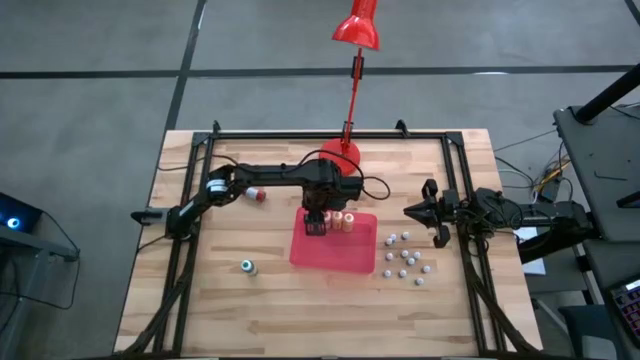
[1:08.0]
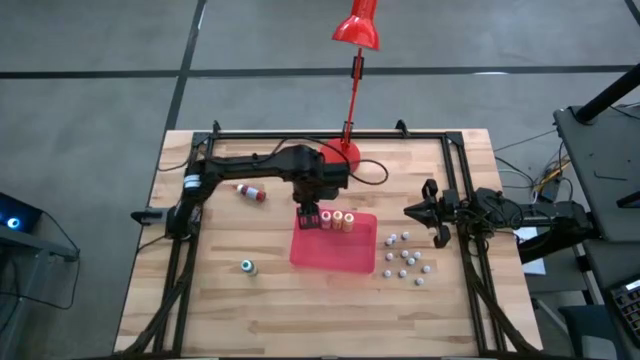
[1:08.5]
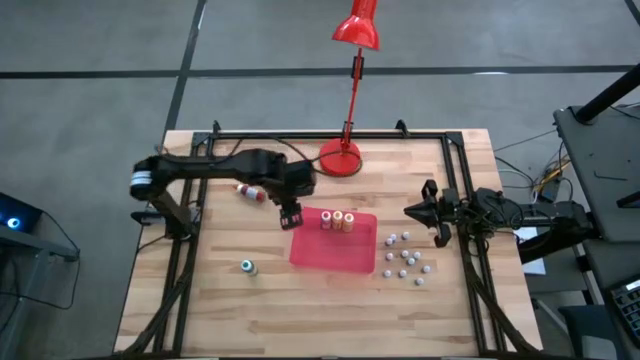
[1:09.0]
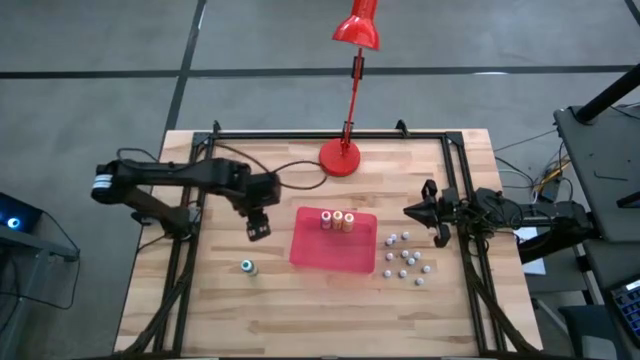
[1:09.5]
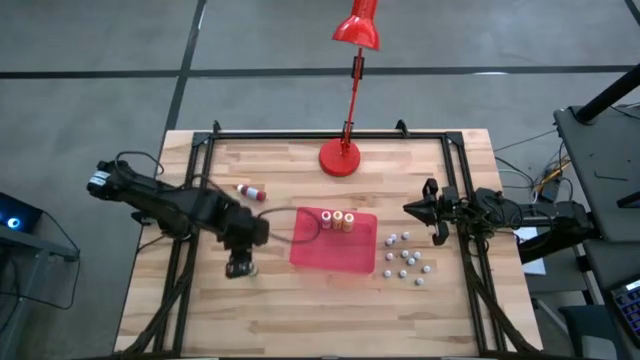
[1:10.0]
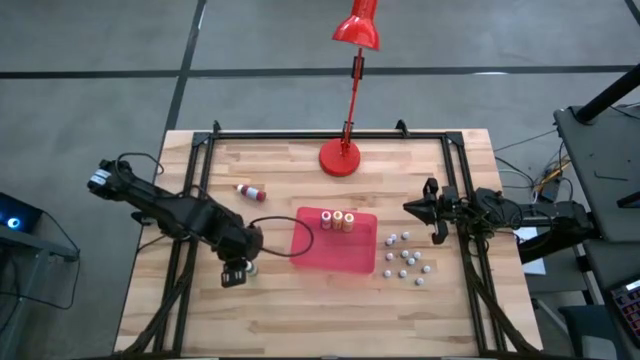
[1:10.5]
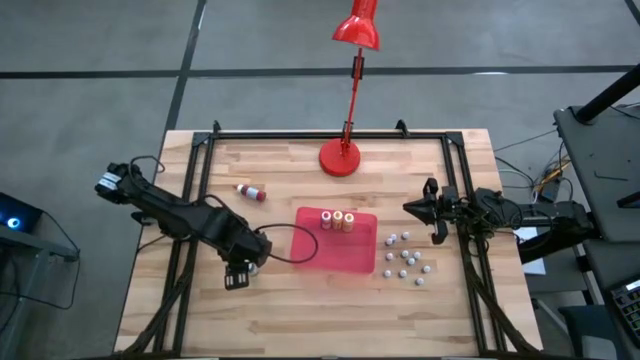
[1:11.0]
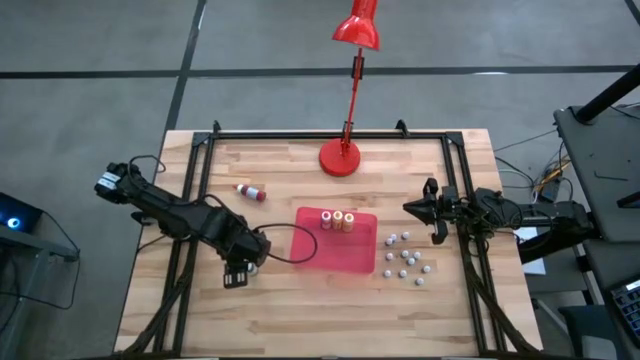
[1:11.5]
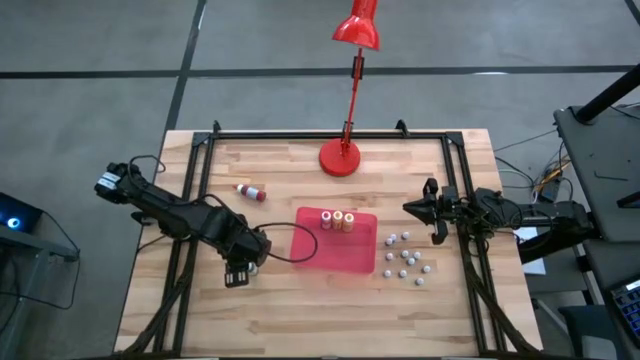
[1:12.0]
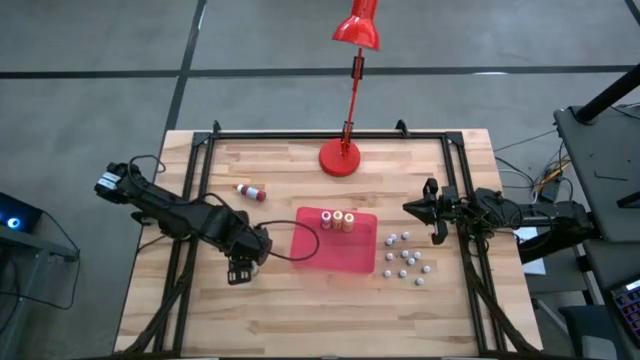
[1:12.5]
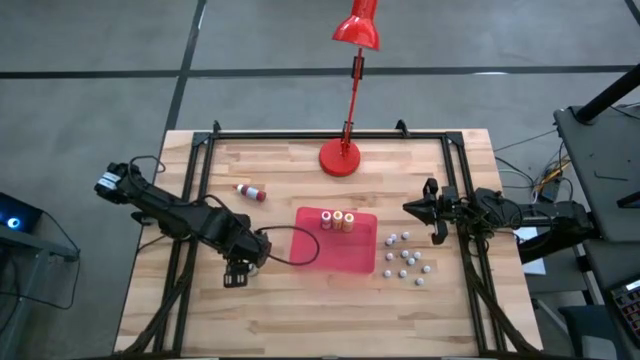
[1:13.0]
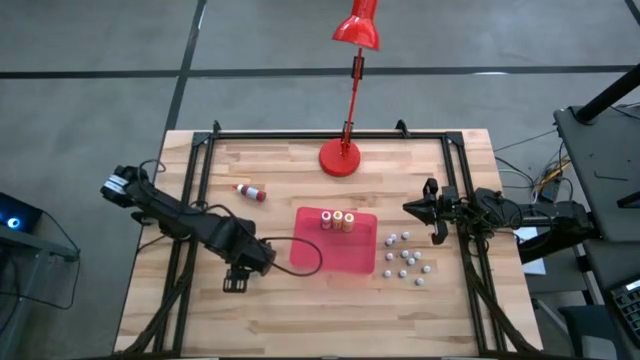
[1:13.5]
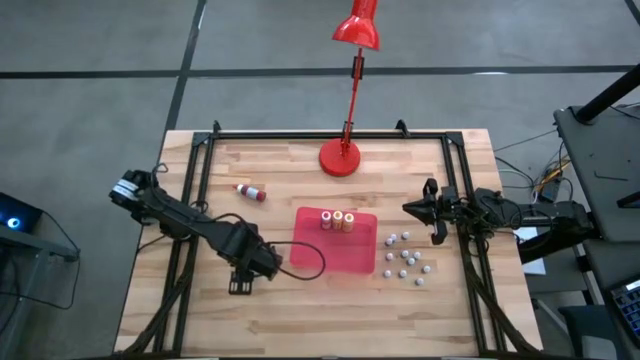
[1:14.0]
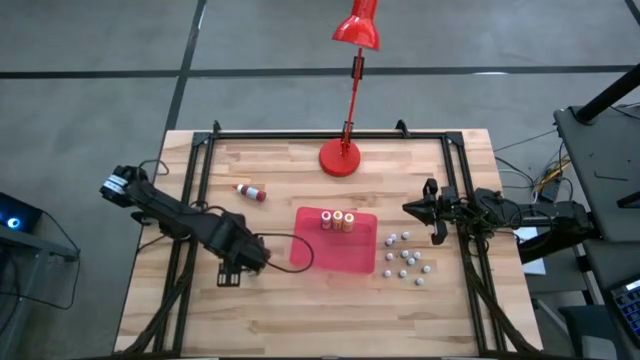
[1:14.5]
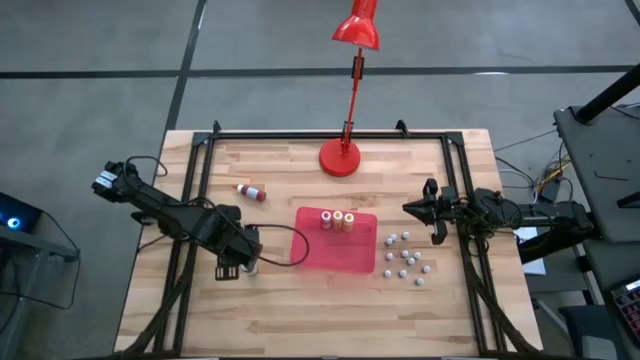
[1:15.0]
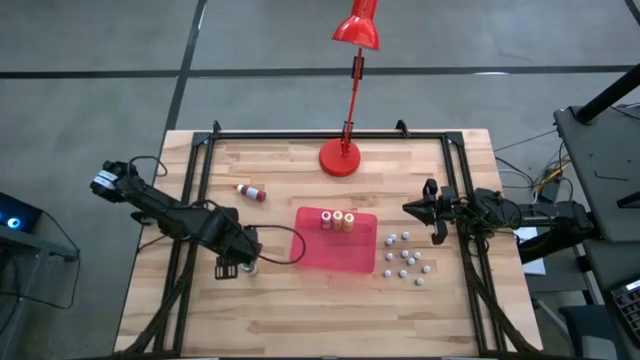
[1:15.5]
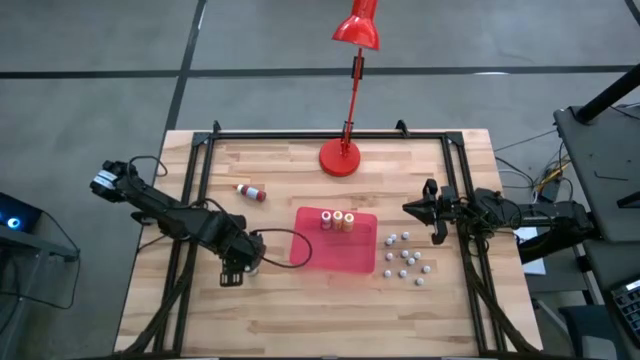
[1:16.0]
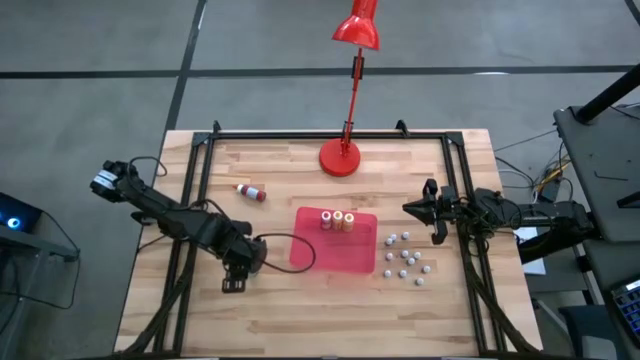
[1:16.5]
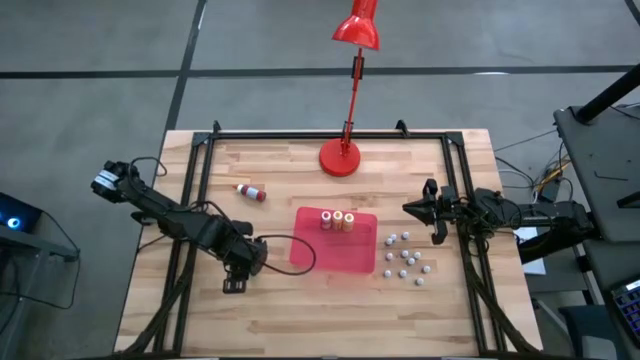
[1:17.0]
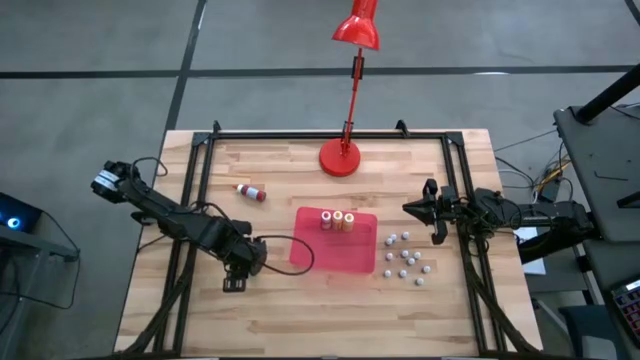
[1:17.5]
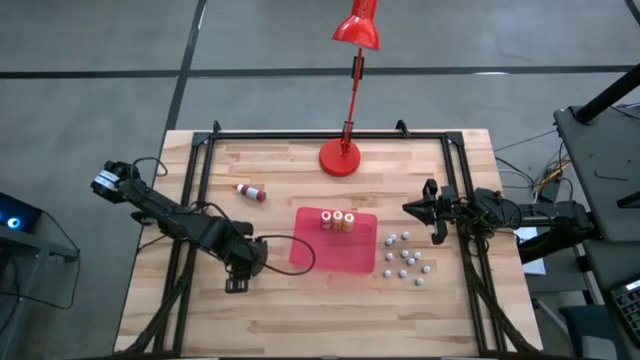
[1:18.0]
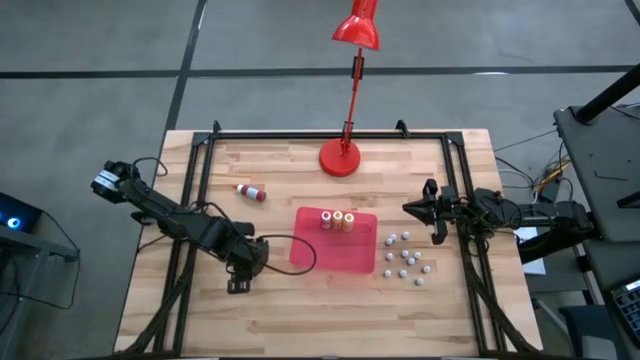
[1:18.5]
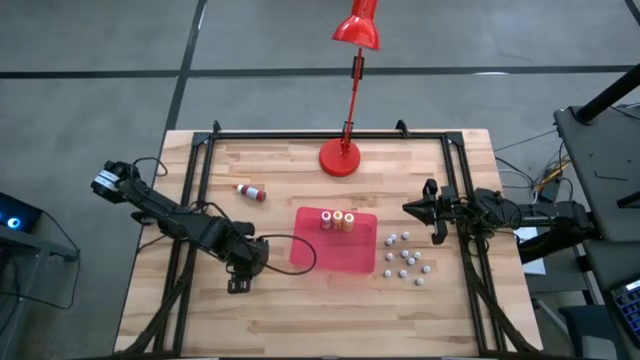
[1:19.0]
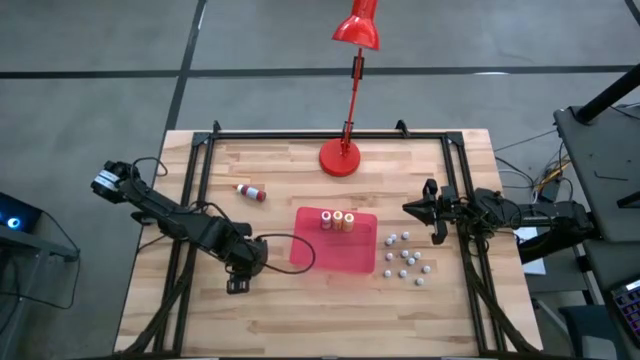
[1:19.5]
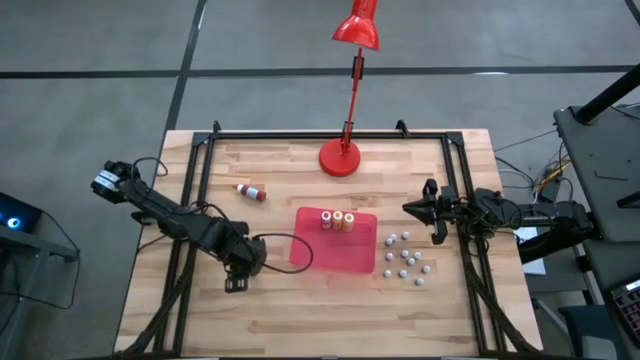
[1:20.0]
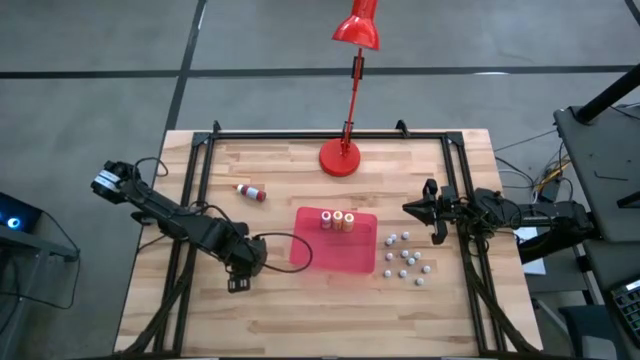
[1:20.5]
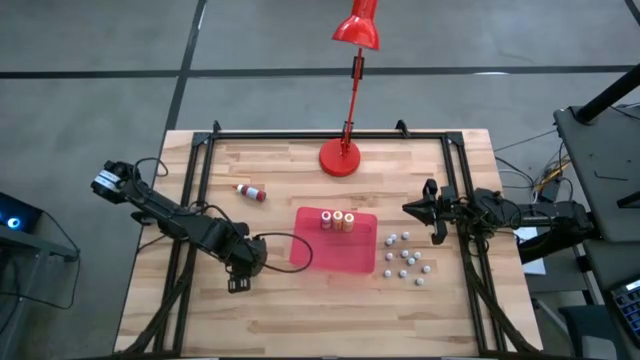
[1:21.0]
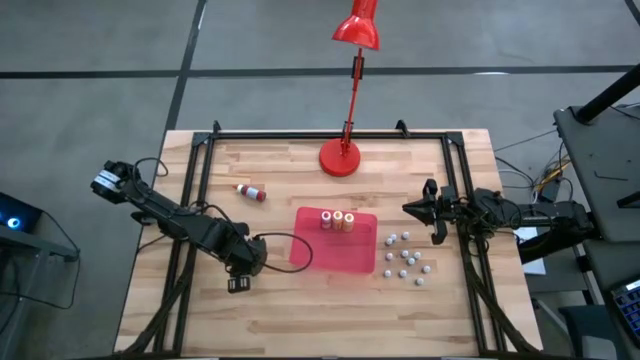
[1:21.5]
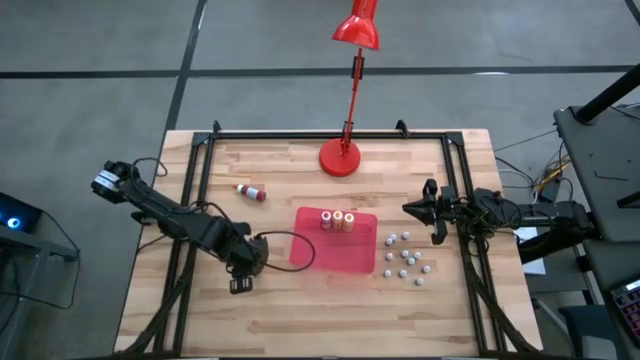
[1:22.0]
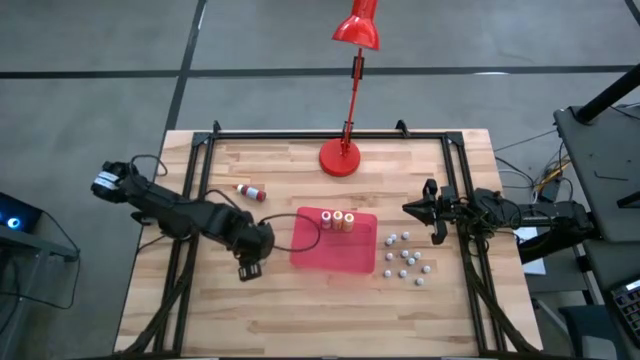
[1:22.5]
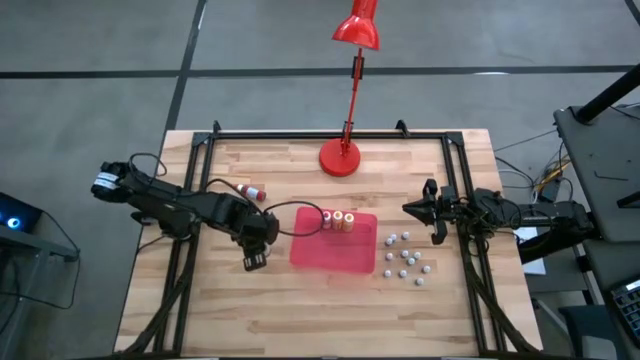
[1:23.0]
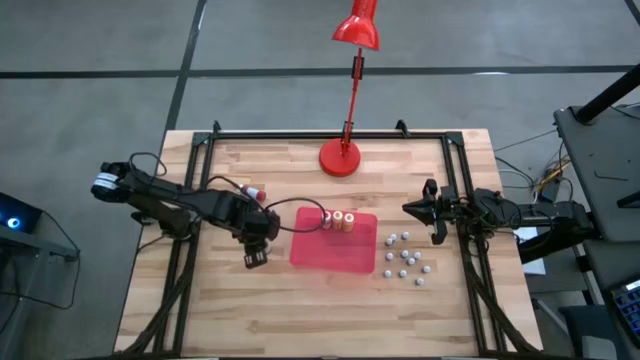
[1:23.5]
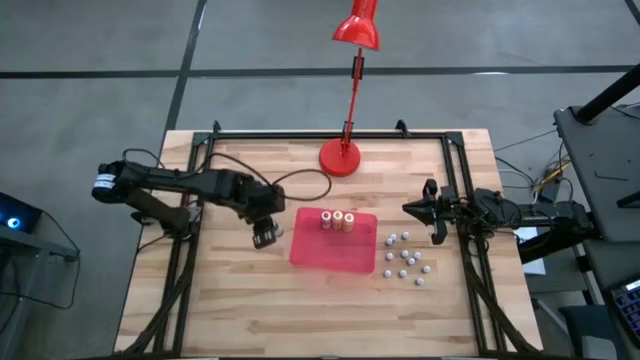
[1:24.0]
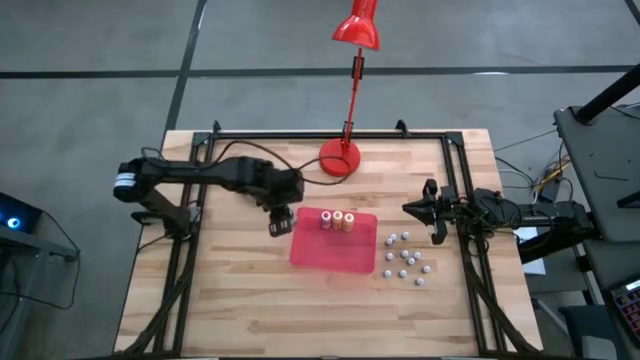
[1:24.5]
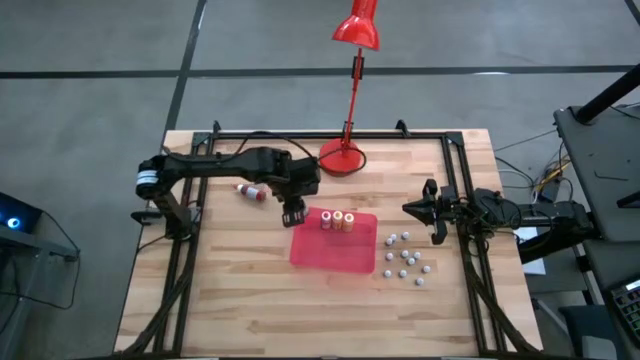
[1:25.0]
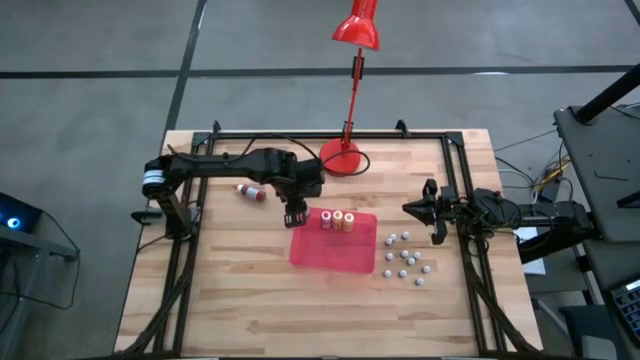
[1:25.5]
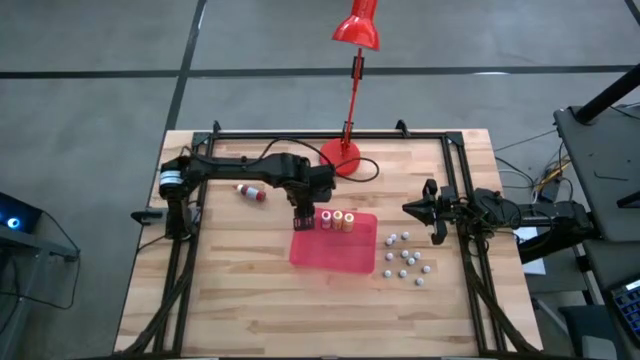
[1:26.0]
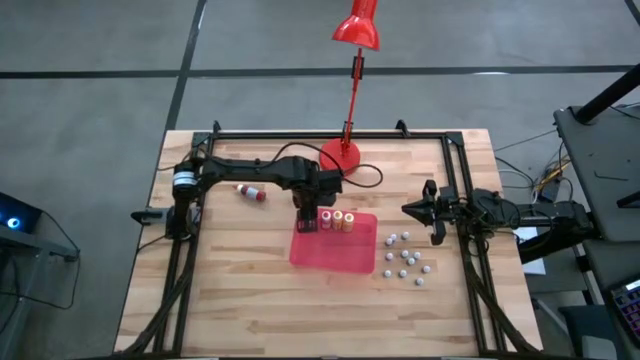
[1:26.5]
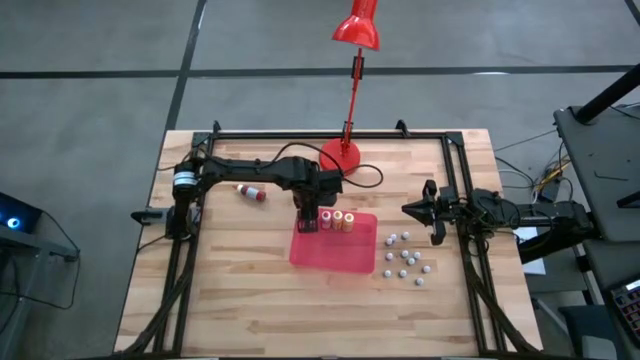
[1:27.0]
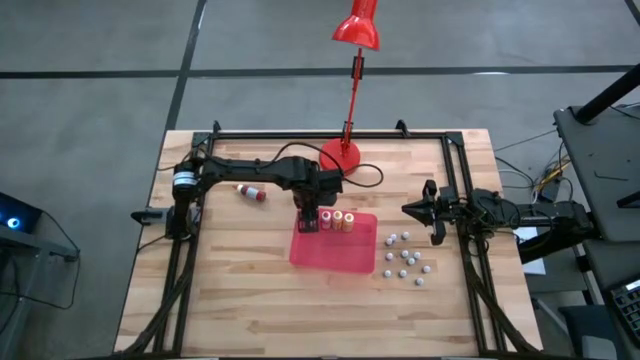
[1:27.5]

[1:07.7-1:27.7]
Task: Pick & Place food coloring
Put the large green food coloring bottle into the red bin
